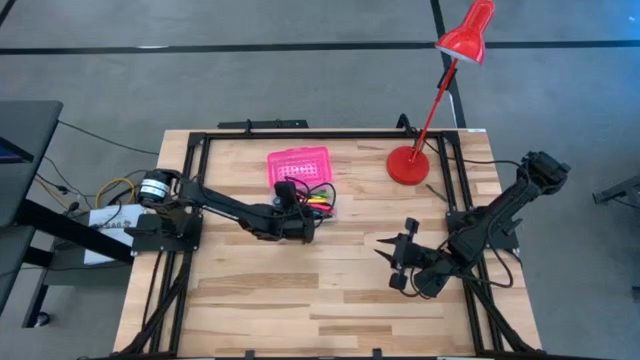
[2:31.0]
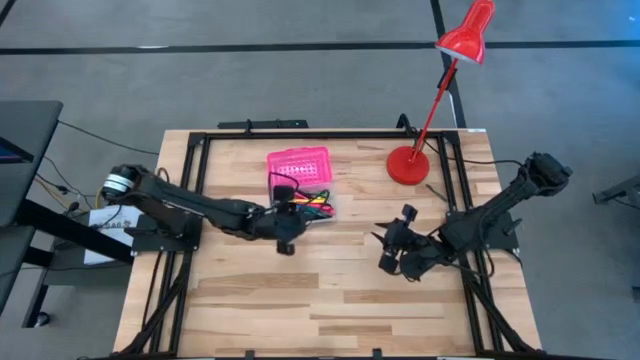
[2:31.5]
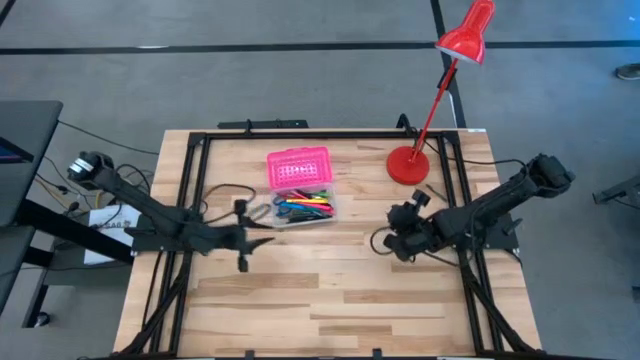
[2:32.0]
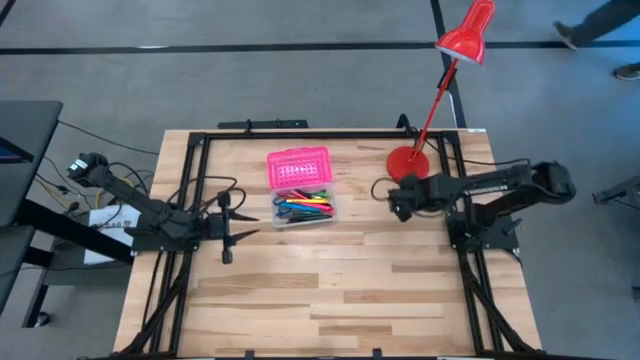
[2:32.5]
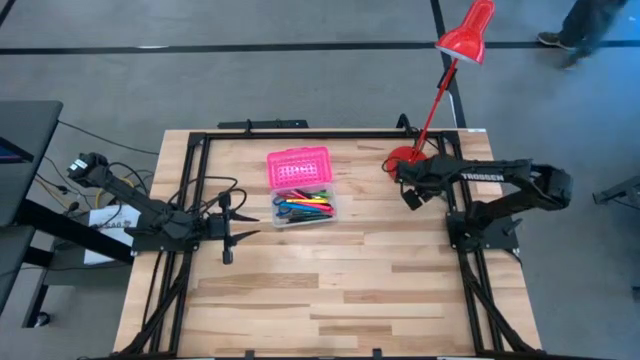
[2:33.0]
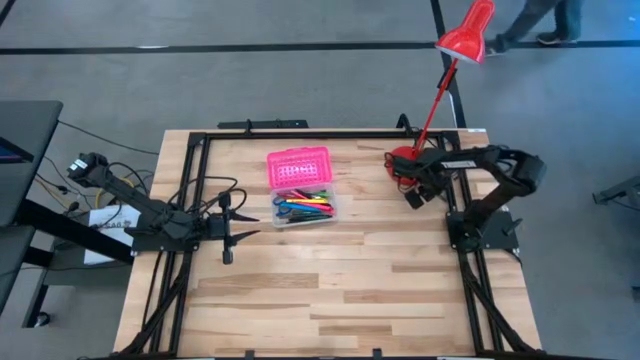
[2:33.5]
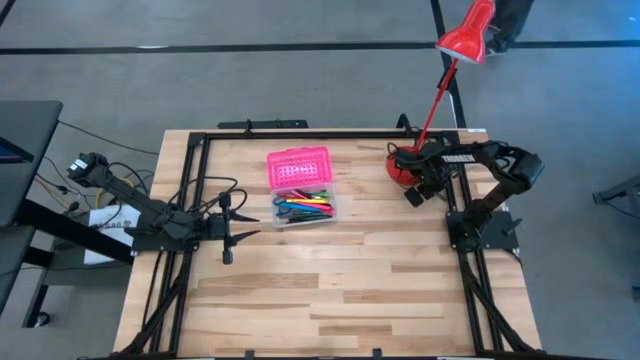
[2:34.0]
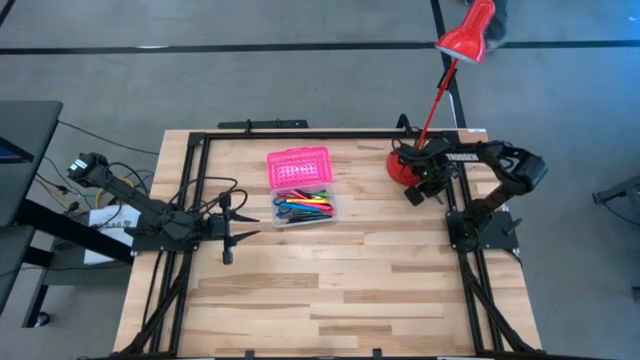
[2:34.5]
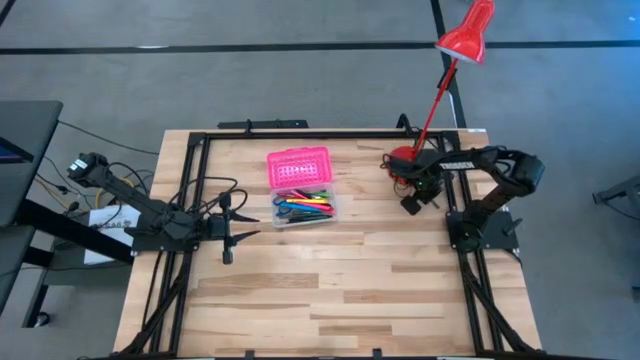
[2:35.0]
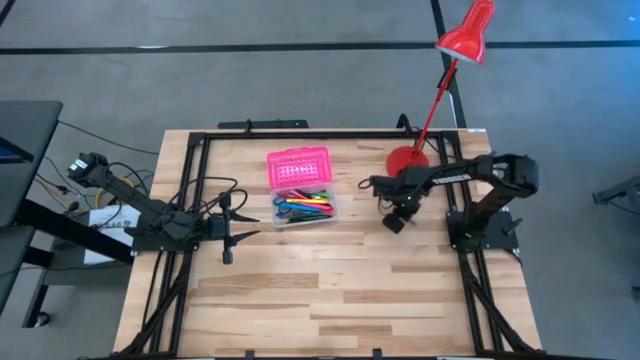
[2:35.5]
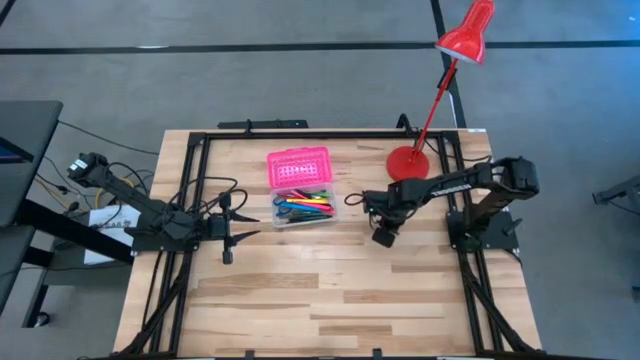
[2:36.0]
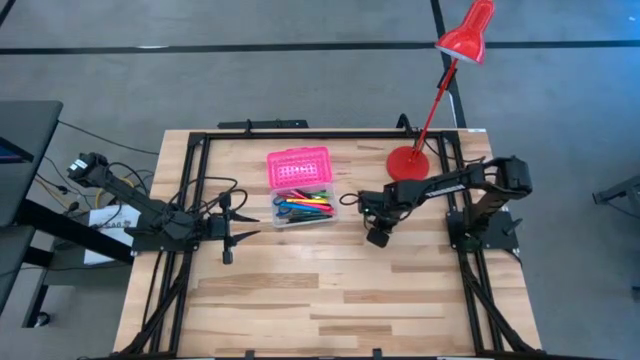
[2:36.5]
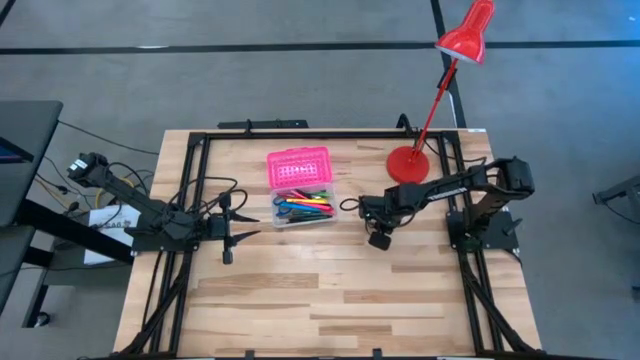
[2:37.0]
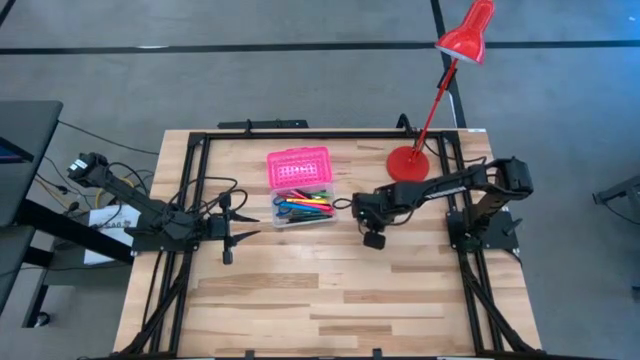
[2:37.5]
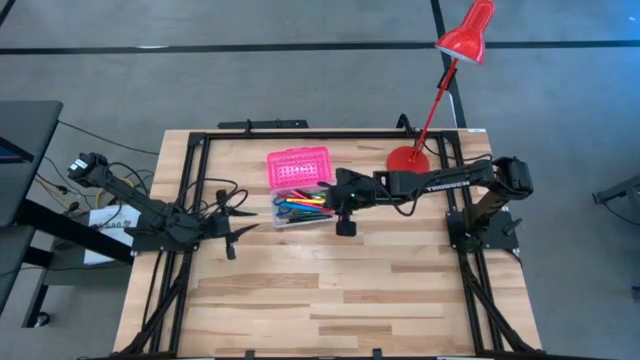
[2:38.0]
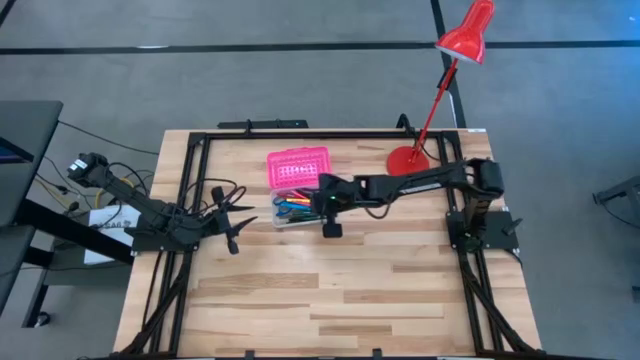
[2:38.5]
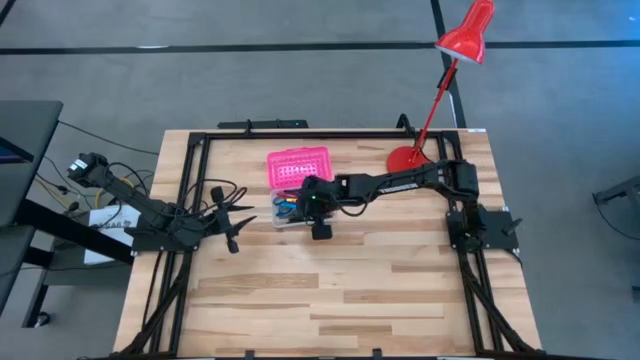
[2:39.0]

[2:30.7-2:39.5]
Task: Pick & place school supplies into a supply box
Put the green crayon into the pink supply box

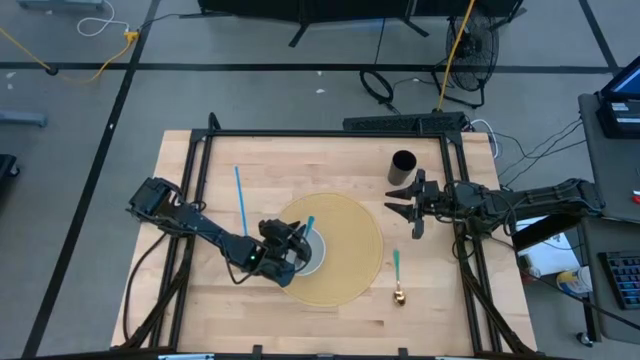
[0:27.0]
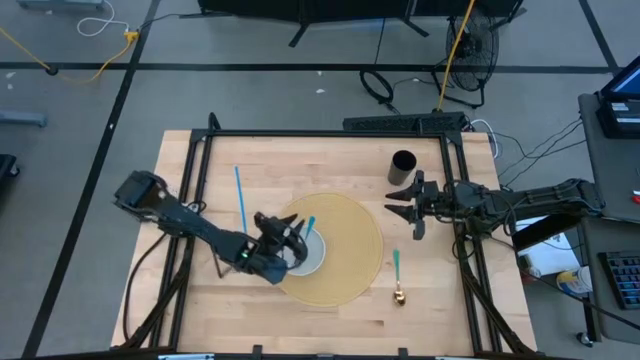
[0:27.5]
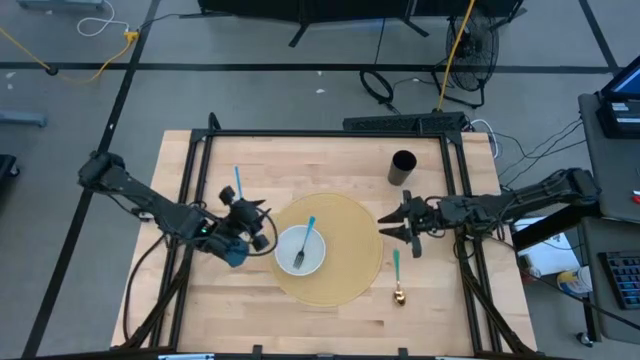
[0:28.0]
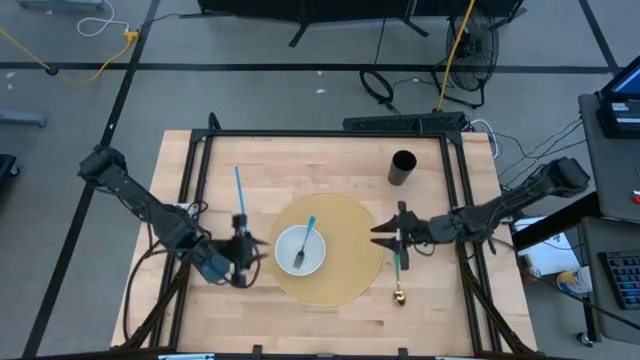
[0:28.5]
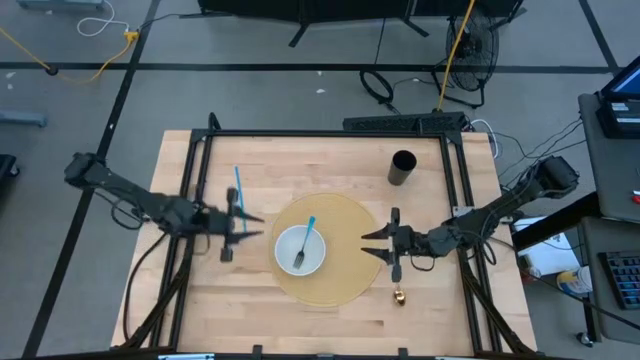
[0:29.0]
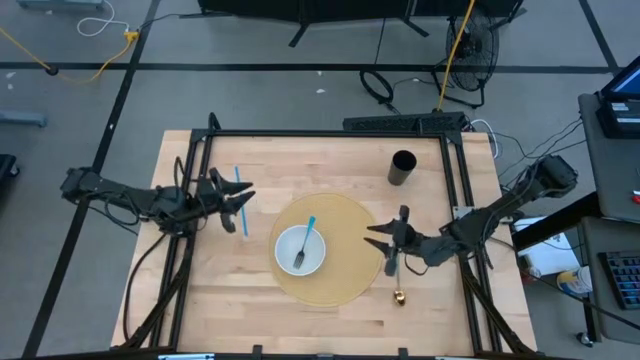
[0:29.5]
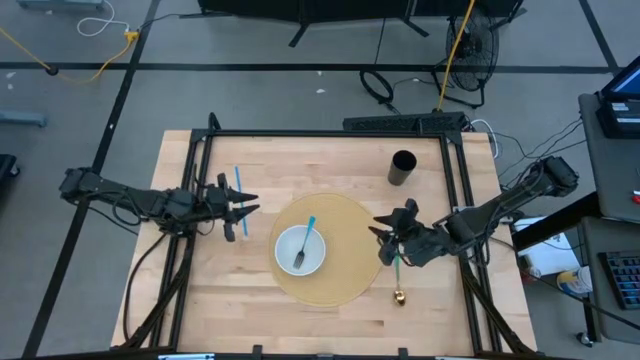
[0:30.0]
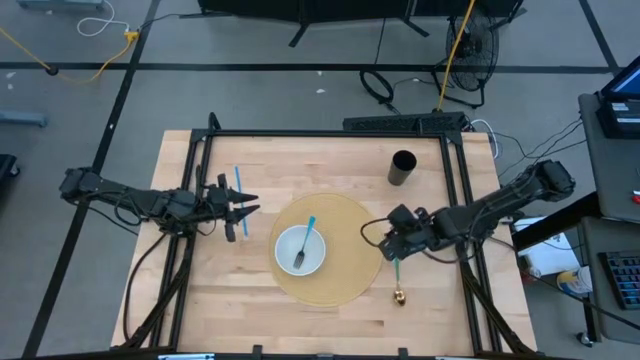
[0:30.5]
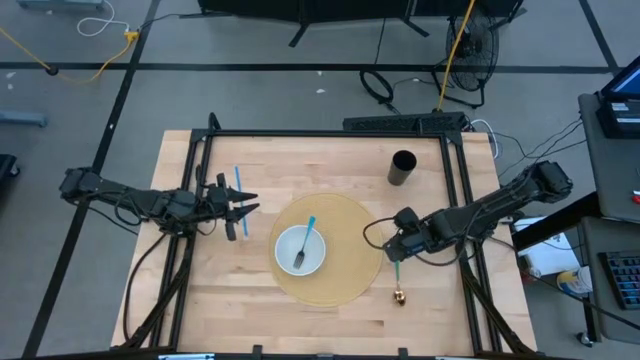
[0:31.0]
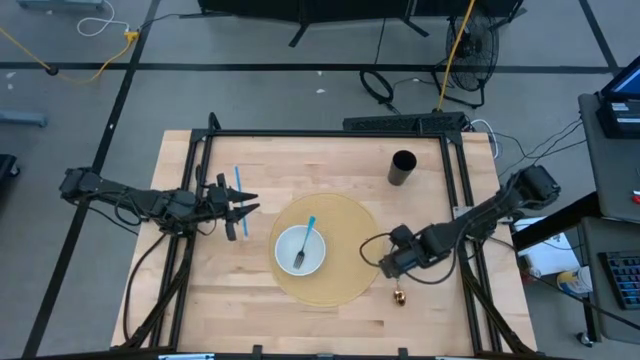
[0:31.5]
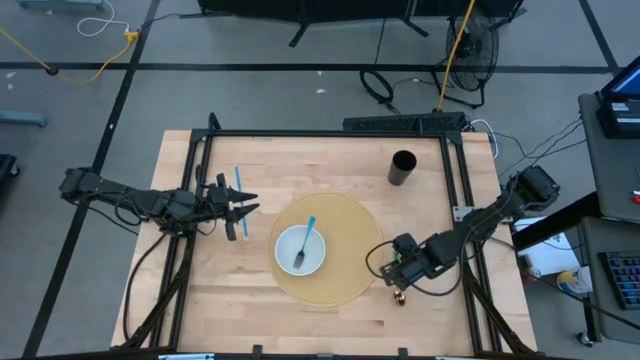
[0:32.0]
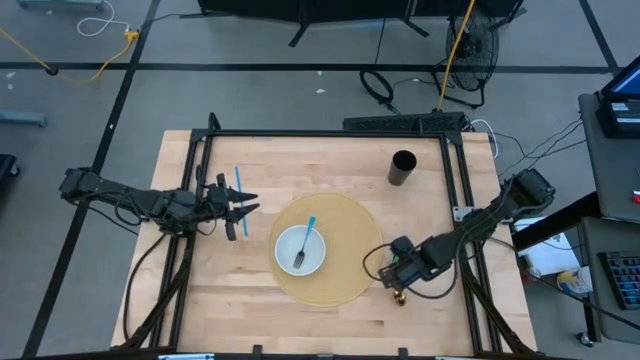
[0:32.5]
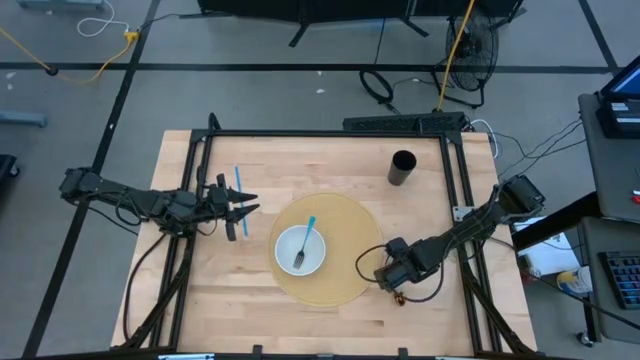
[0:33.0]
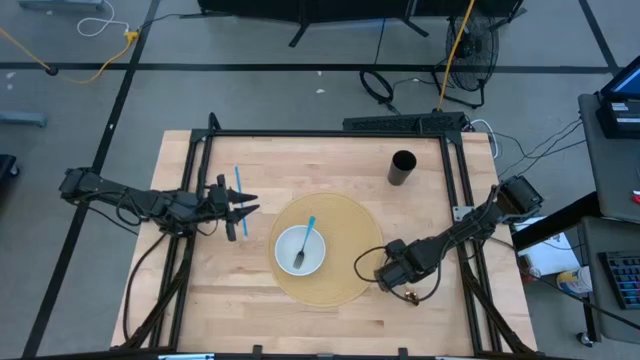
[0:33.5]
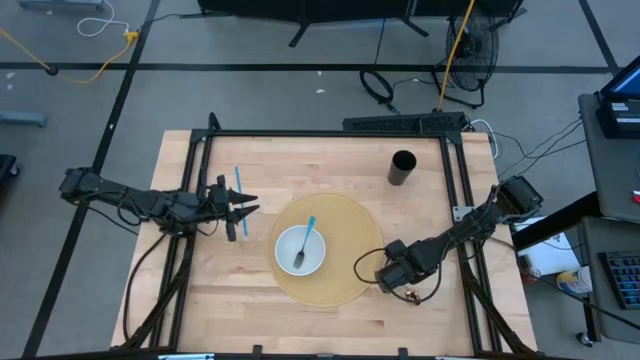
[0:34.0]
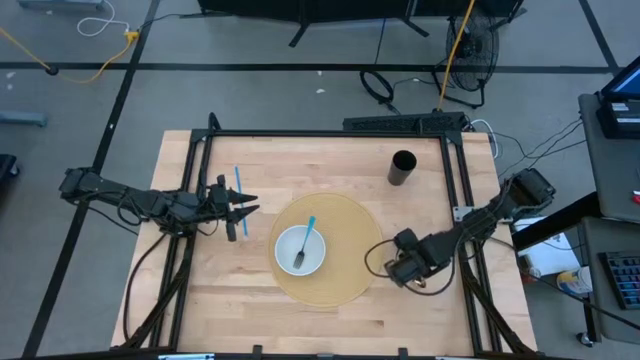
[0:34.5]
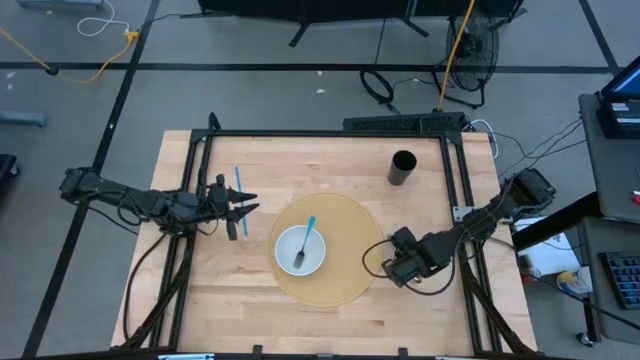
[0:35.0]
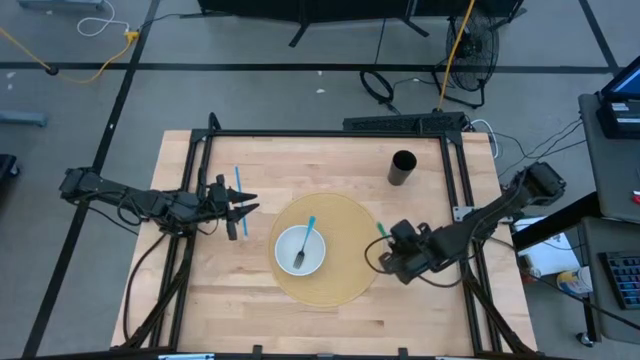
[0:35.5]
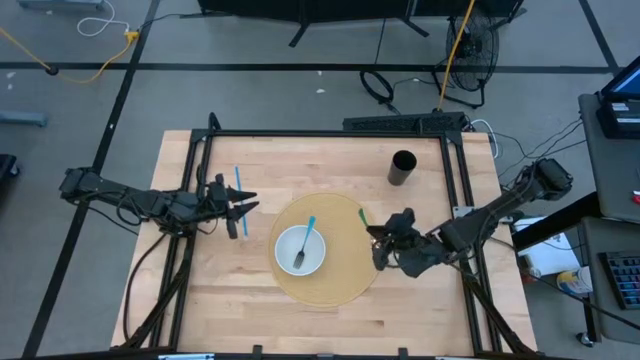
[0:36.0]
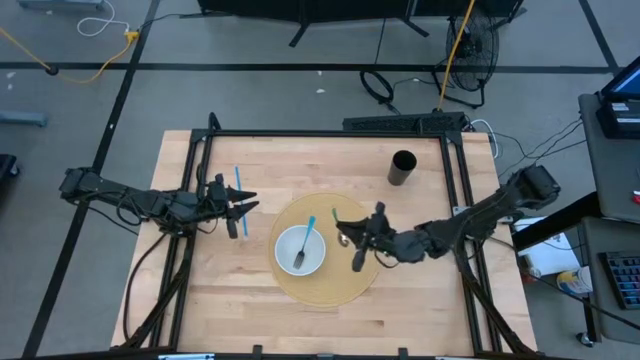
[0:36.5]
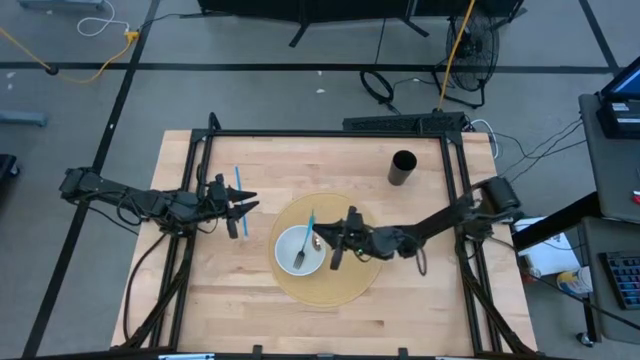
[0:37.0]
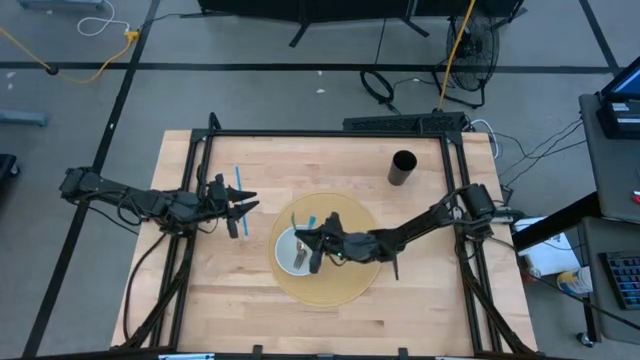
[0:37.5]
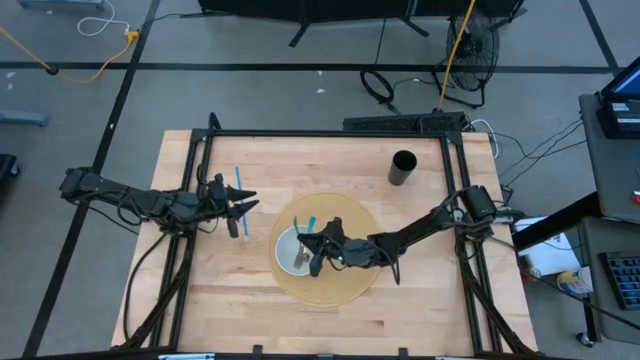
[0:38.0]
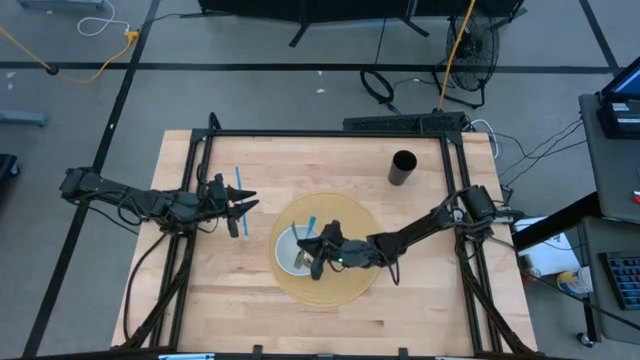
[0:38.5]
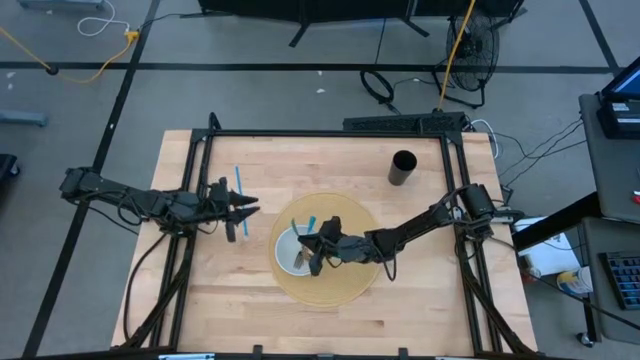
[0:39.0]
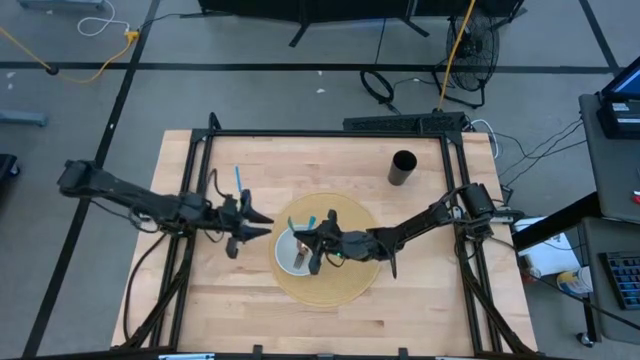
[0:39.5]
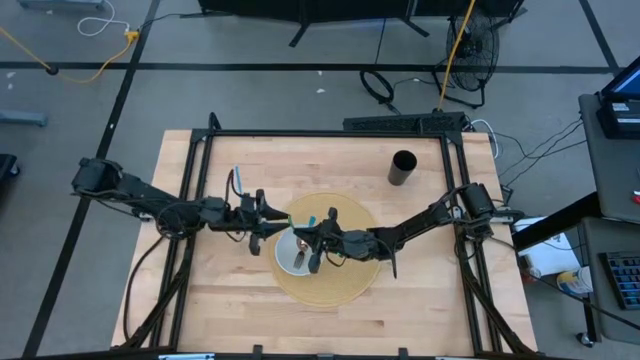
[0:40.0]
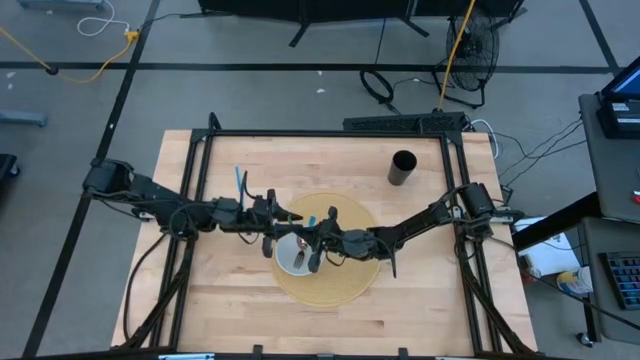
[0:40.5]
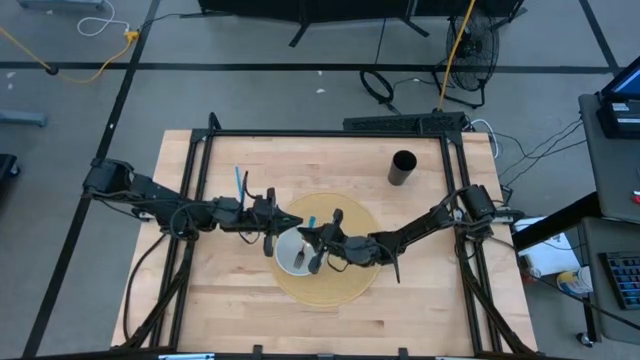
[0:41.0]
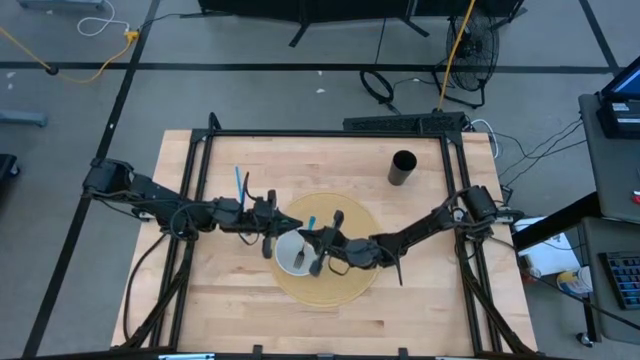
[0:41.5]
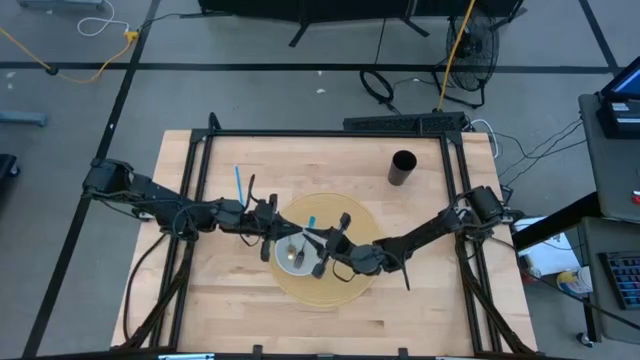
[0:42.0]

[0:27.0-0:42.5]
Task: Pick & Place Utensil
Put the green spoon into the white bowl on the brown mat
